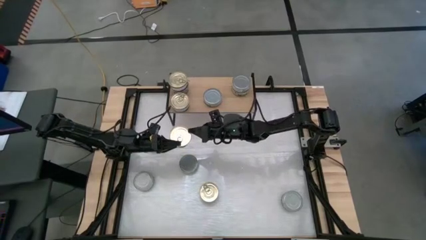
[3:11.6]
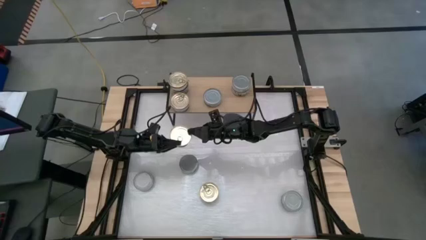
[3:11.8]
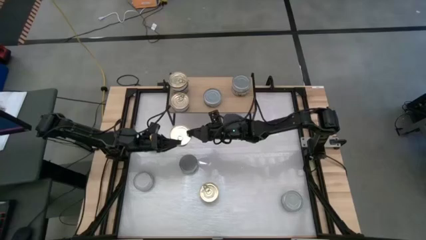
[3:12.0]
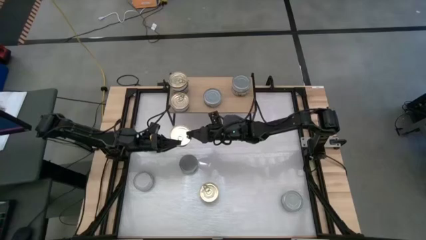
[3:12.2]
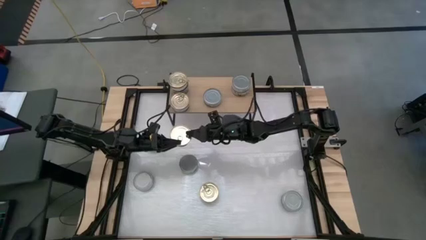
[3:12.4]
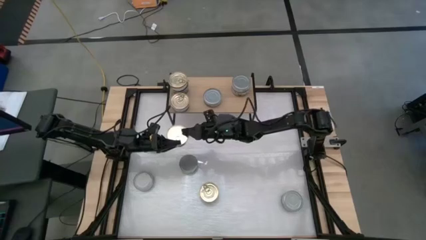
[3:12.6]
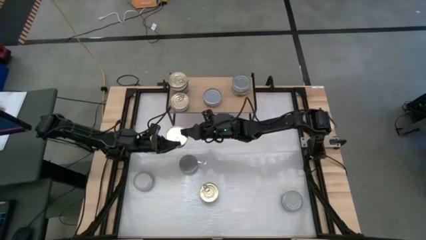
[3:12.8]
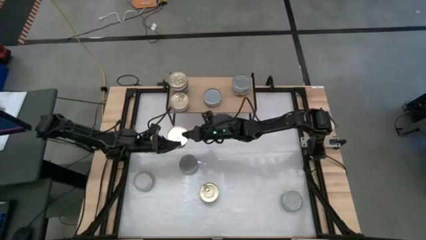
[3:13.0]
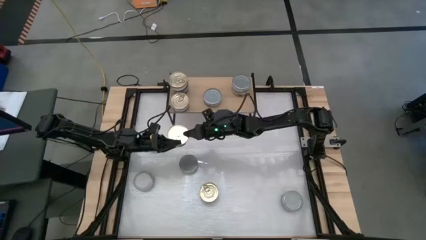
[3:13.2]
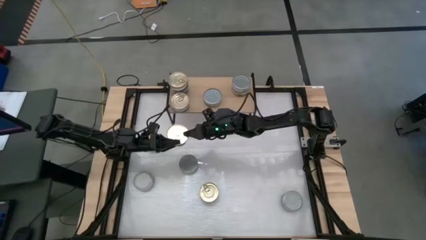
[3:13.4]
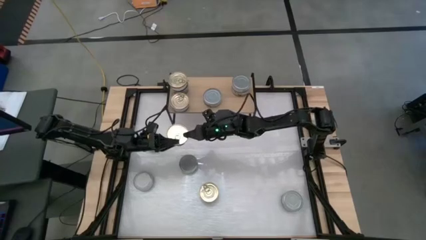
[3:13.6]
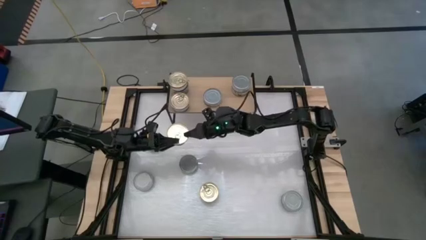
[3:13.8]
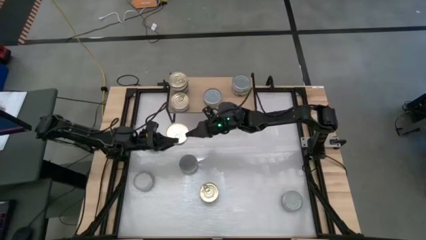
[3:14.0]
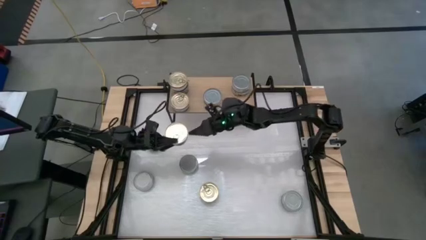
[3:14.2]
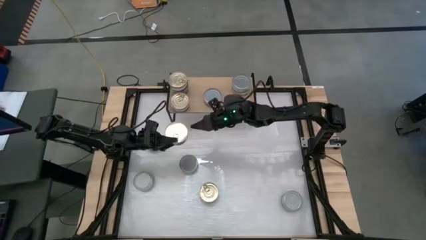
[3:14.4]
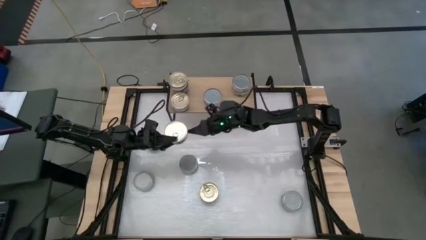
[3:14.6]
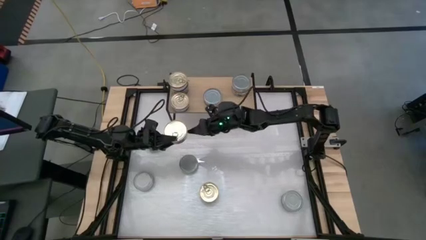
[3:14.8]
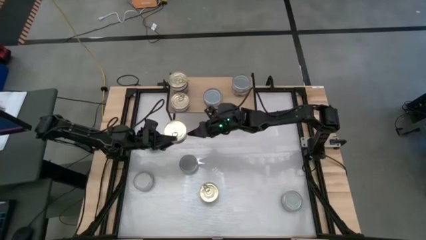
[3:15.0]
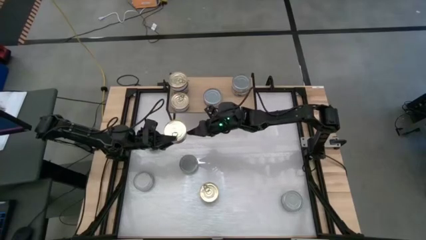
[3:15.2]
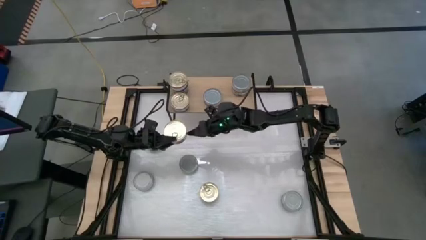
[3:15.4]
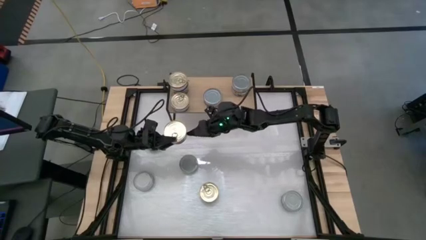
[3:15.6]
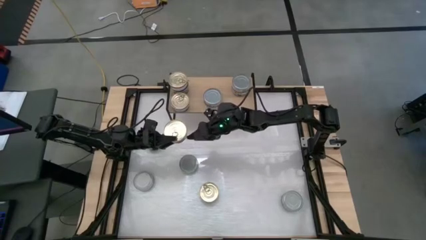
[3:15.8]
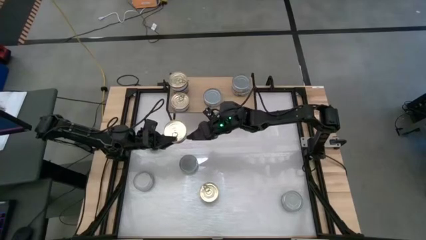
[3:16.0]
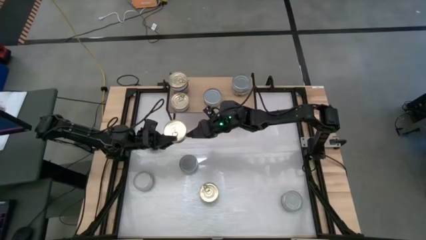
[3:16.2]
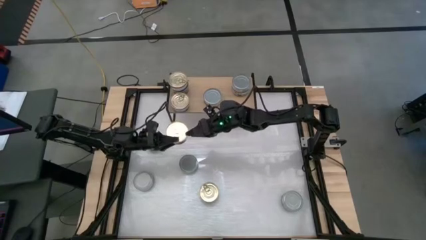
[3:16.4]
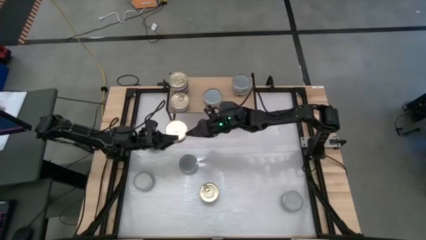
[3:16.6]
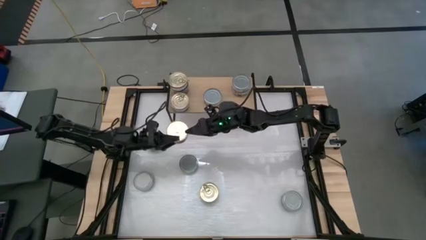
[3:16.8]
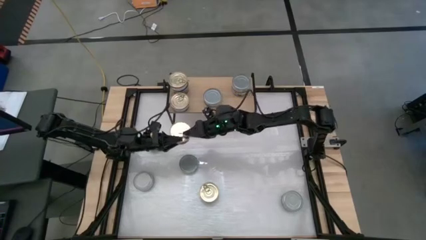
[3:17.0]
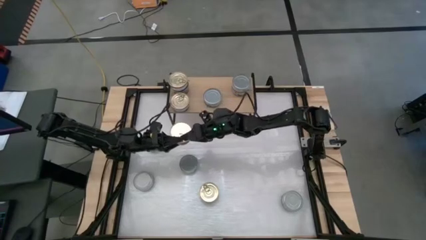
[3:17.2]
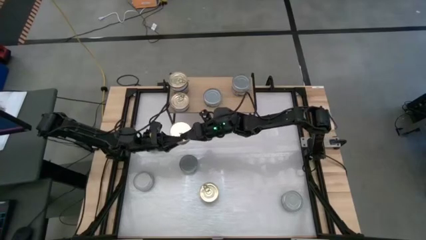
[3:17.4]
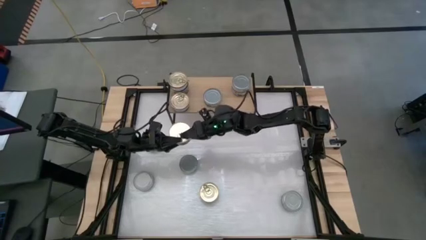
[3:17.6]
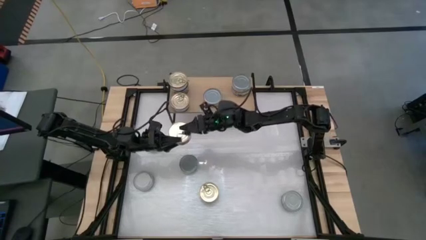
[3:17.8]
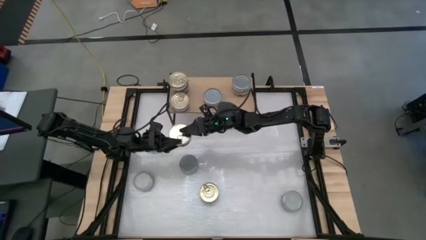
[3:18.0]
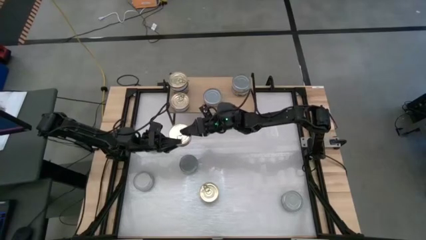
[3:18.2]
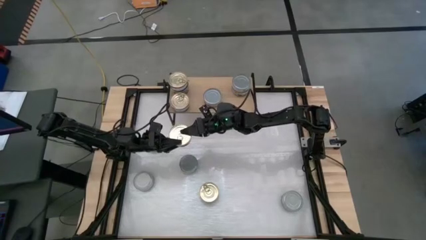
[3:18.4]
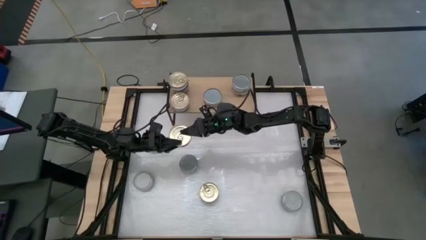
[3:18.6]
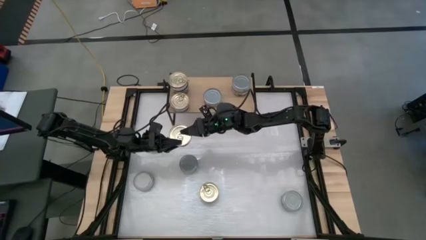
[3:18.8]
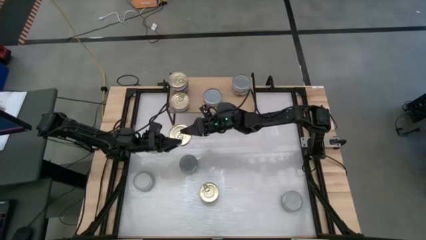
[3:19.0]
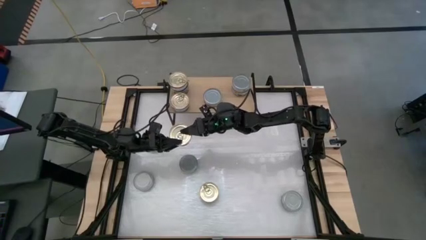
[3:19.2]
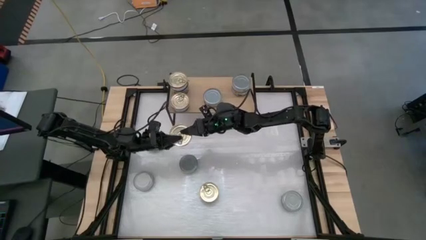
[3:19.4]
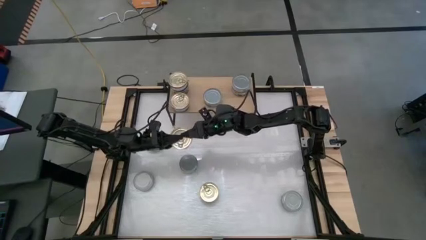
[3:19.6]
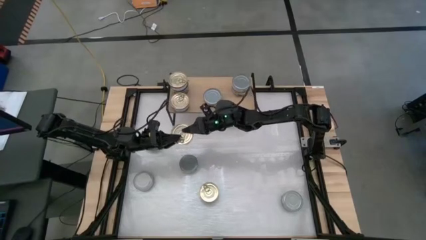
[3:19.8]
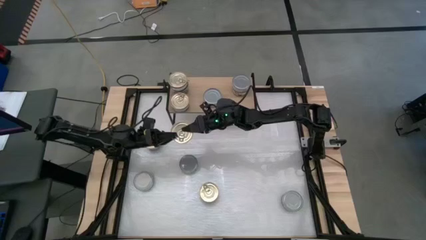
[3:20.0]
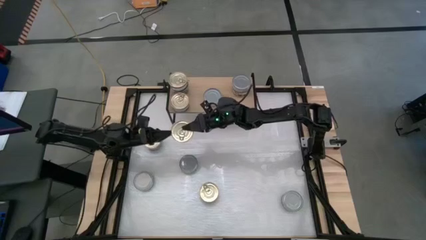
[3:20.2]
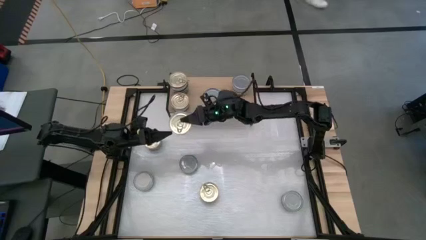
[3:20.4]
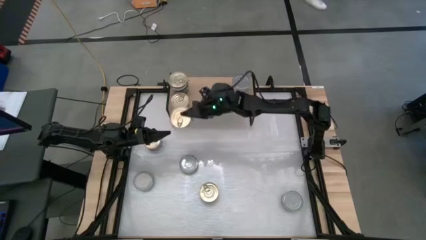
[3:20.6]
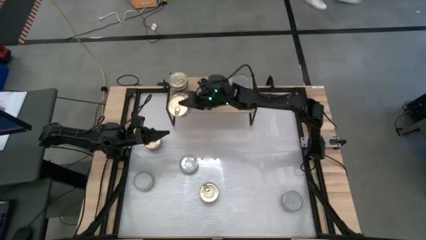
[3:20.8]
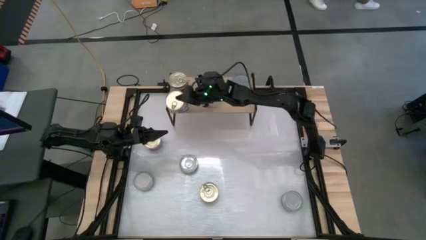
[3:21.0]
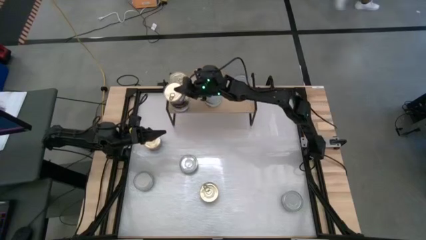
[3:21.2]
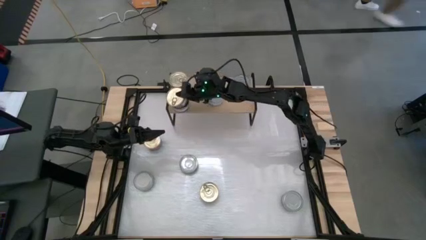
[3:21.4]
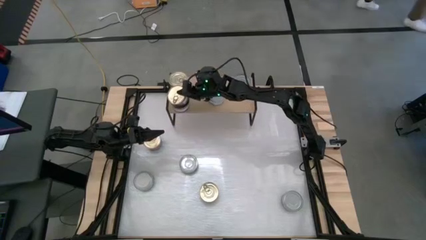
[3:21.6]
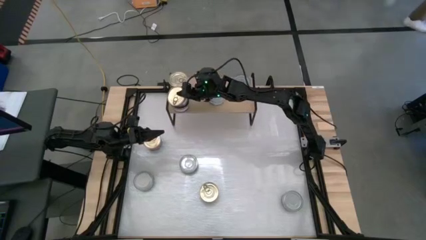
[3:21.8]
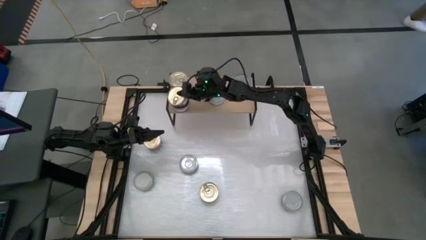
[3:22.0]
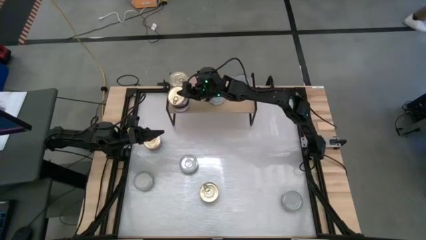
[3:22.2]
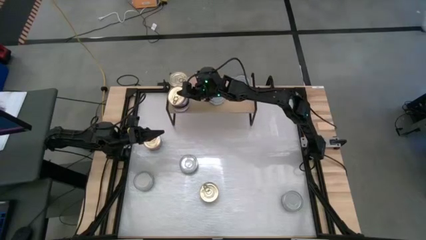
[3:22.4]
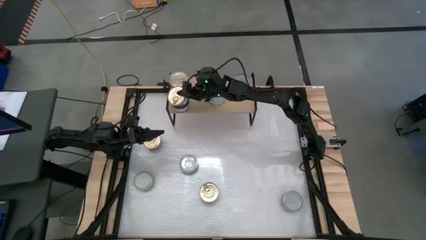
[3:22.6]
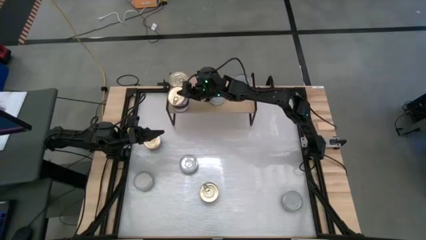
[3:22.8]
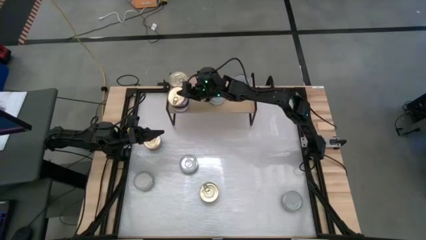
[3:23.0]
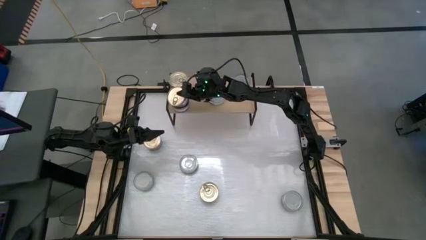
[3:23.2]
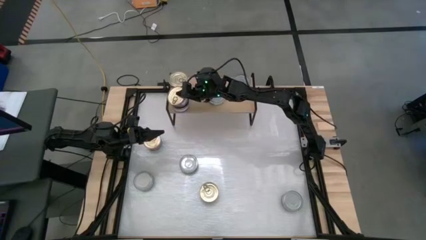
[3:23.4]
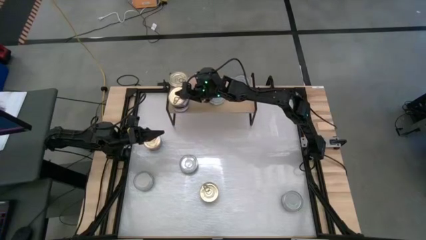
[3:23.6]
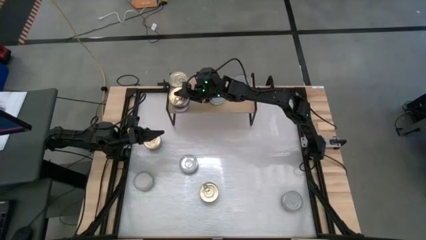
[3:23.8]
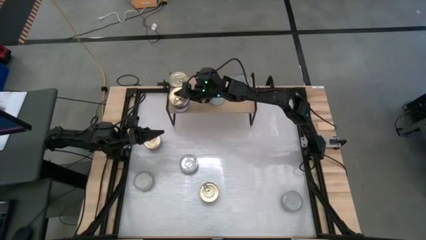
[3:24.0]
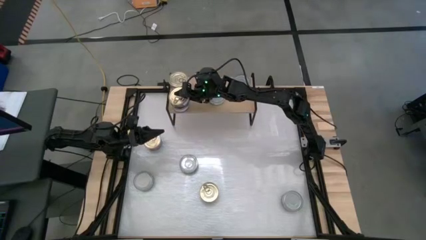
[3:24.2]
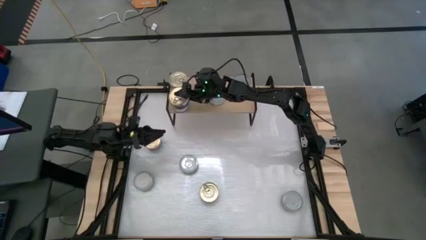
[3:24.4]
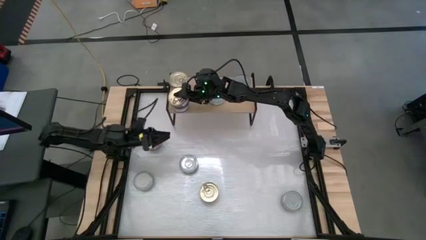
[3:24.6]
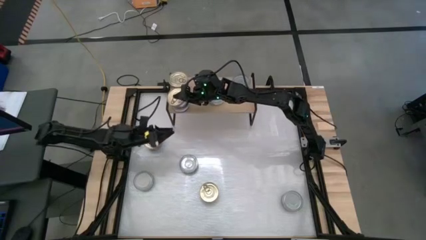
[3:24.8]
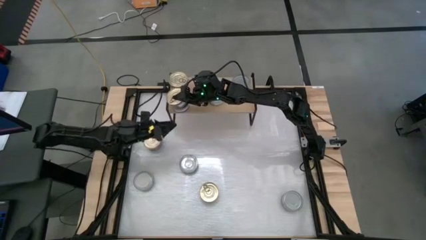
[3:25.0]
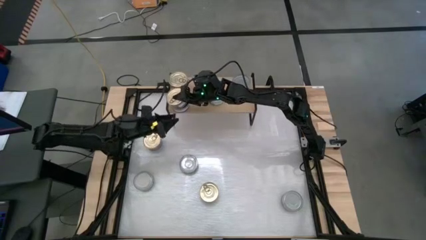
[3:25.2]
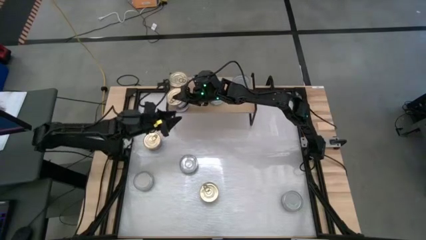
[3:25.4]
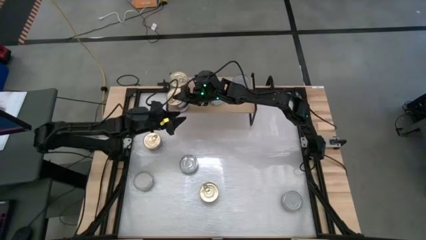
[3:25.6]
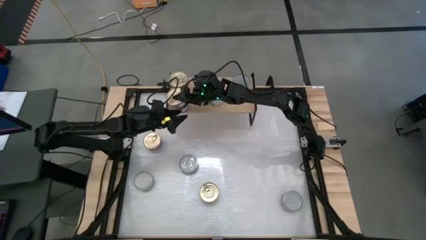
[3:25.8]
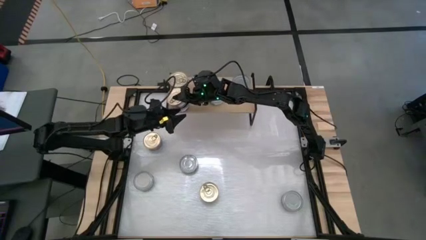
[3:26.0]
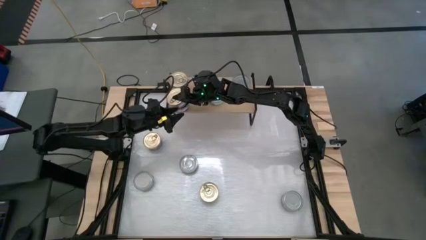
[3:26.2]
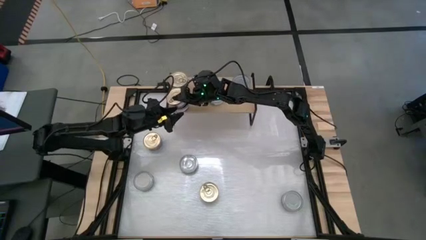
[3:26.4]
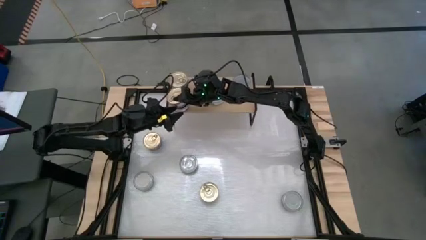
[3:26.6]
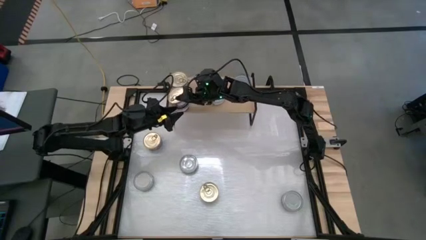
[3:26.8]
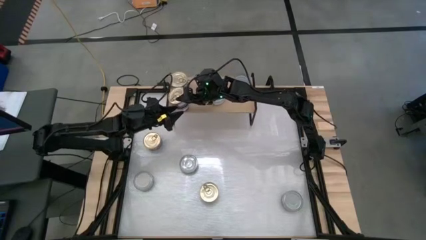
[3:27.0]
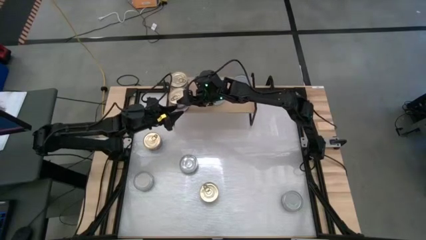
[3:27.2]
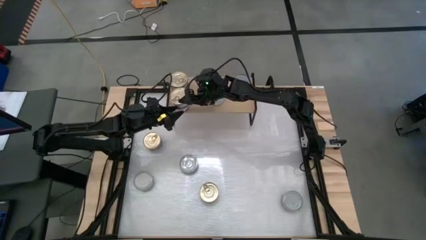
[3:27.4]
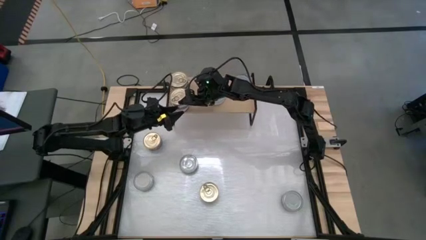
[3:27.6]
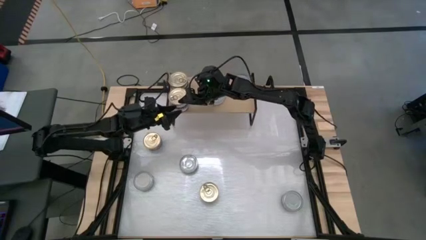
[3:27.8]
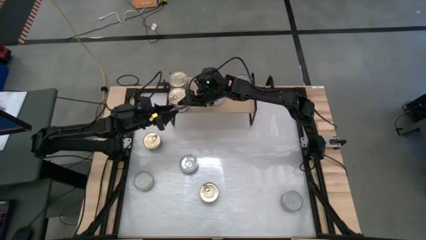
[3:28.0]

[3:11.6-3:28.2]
Task: Stack canned seafood by type on shelf
Stack the blue pink tuna can on top of the other blue pink tuna can on the shelf
